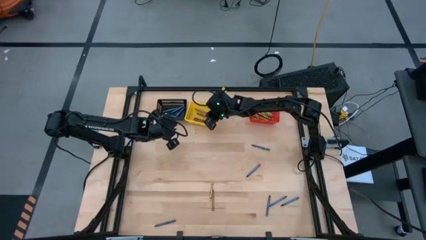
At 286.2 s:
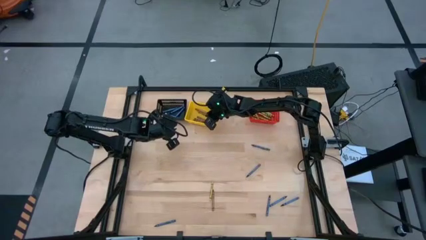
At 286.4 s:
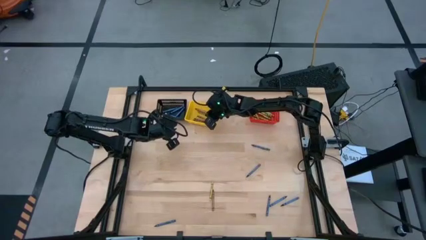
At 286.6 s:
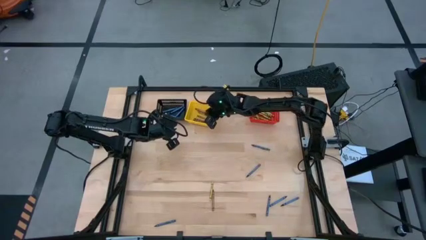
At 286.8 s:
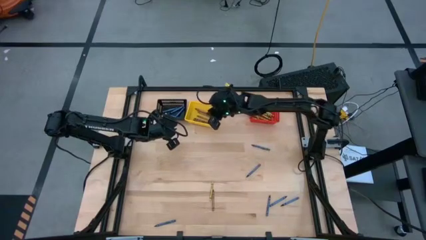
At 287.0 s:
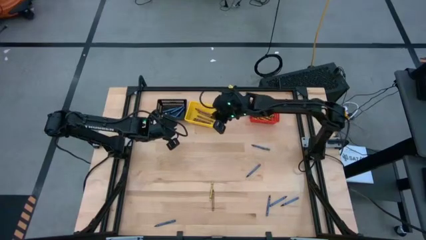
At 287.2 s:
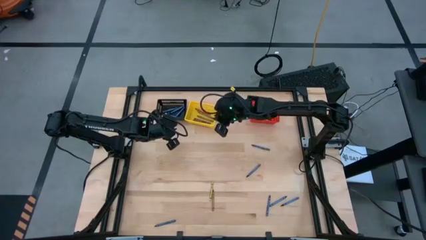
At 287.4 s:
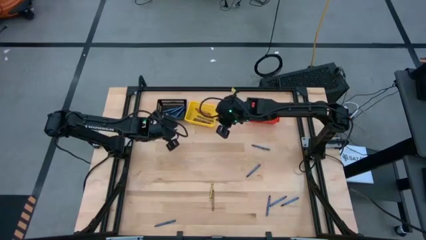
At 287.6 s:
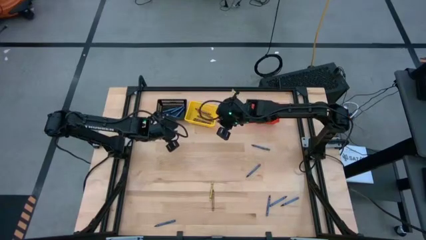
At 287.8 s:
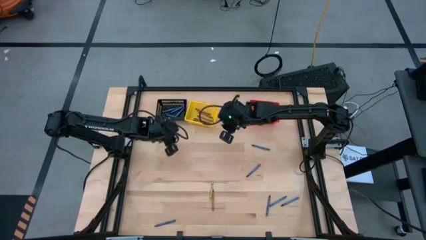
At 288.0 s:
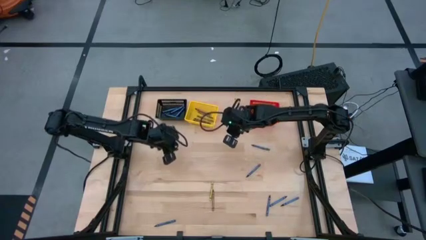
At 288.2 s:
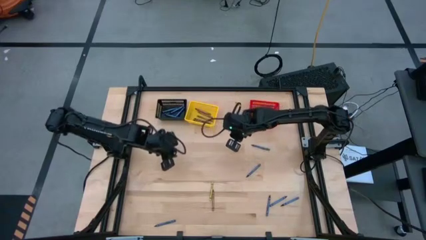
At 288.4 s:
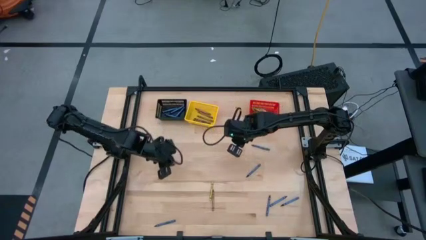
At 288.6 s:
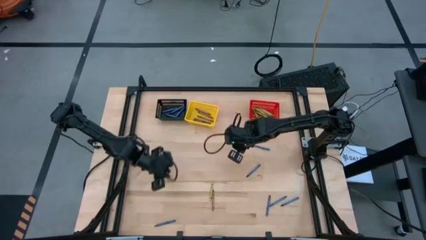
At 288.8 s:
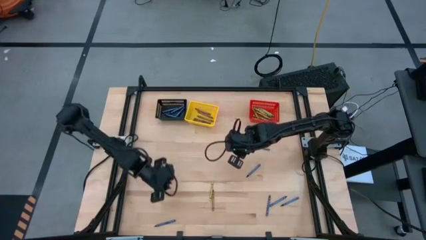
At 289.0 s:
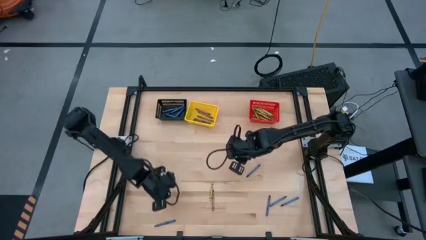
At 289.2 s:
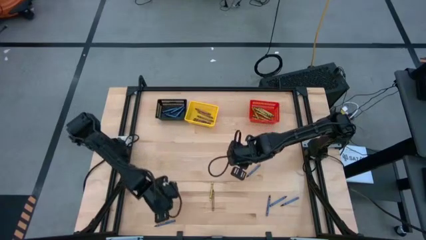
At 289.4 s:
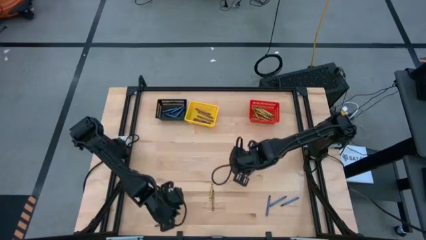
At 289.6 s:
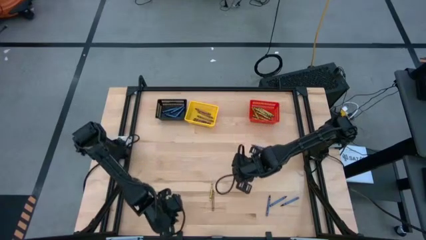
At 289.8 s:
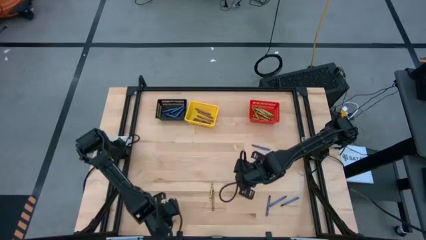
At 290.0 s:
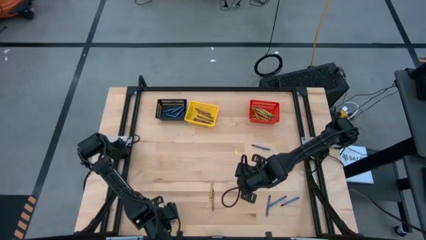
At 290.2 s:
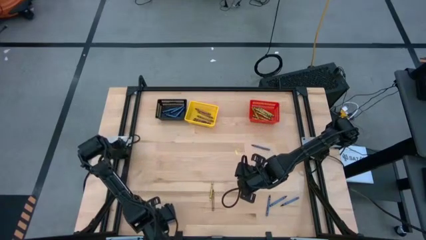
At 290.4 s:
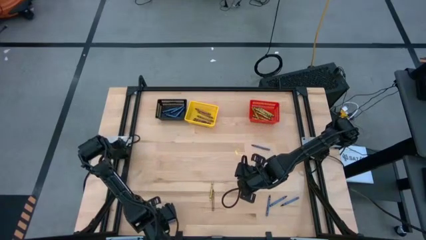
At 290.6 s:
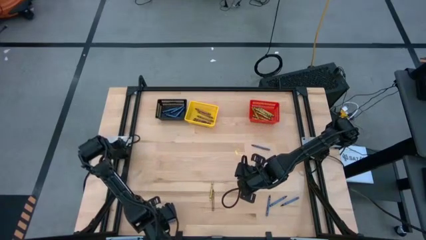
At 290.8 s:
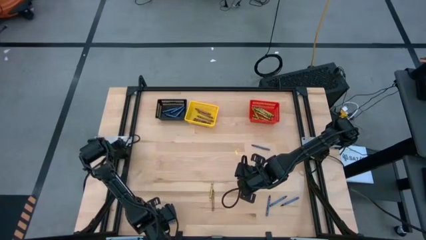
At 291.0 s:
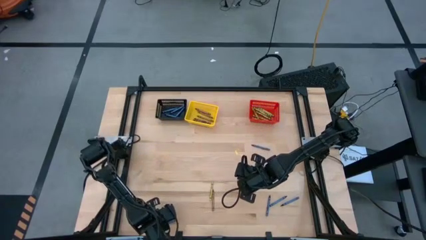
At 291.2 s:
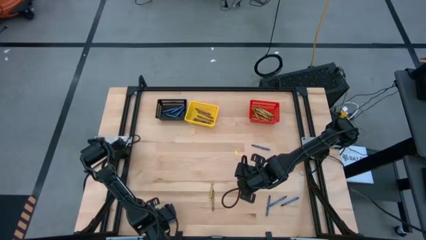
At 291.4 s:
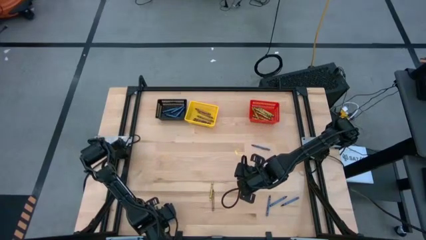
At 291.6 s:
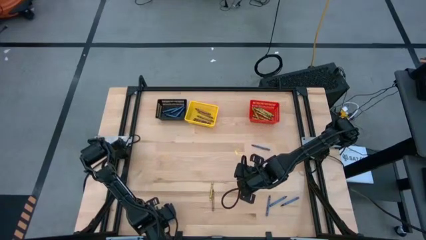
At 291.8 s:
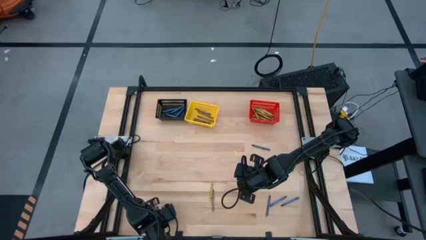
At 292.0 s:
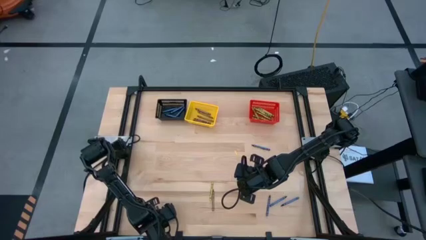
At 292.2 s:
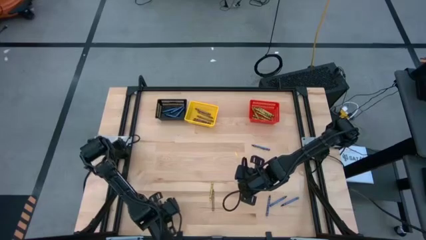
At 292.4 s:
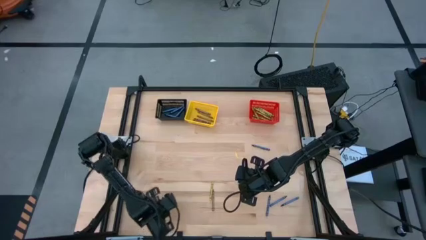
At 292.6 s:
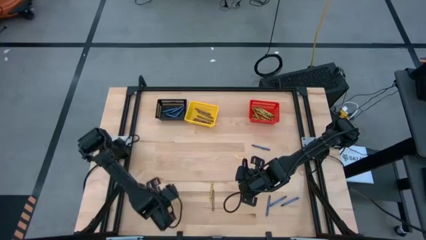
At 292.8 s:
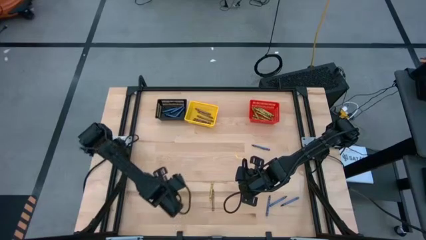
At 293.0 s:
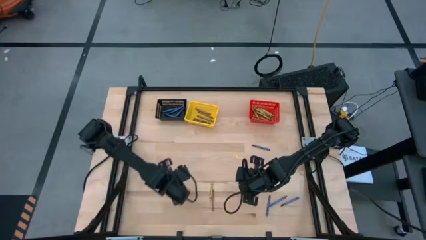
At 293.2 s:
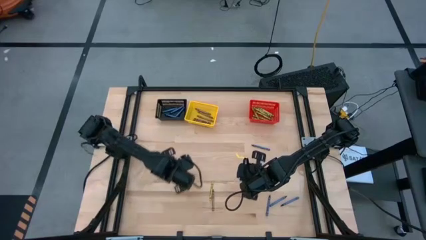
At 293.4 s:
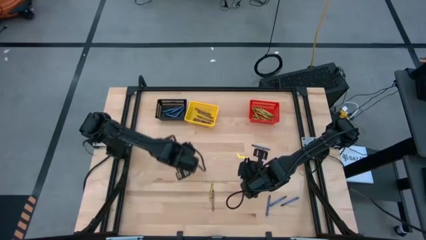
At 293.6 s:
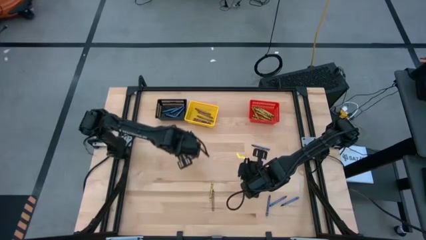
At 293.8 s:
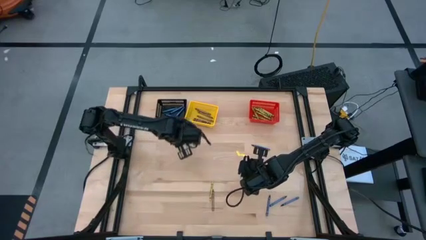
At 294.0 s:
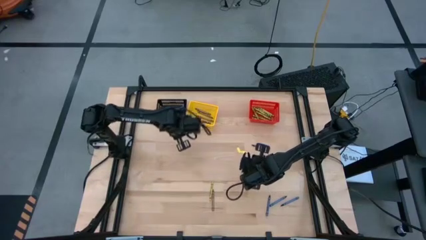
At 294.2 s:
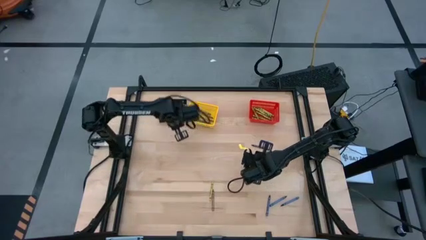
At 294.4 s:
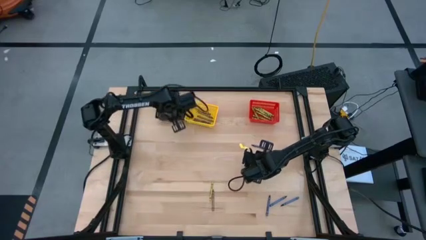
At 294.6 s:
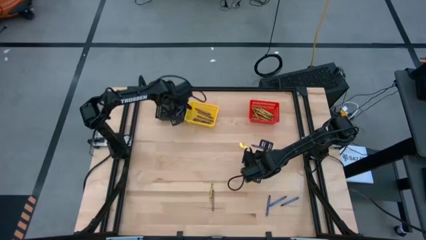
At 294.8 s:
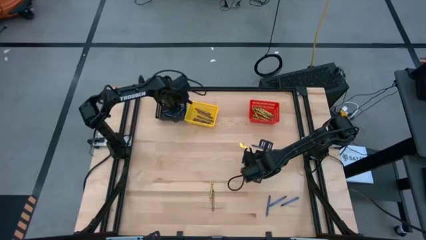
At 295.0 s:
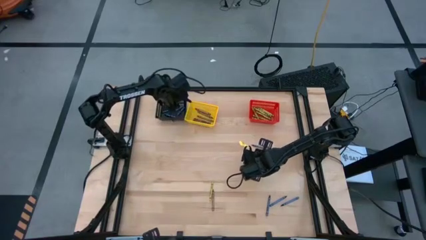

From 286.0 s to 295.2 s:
Task: Sort crayons
Put the blue crayon into the black bin

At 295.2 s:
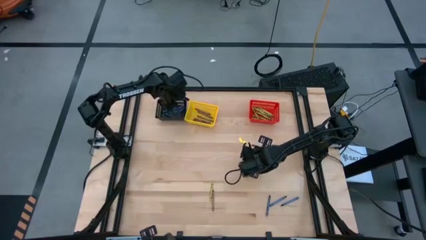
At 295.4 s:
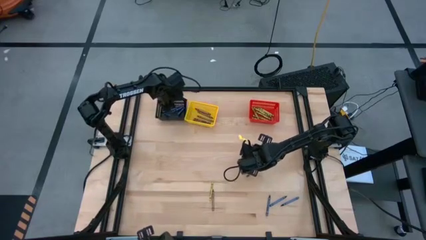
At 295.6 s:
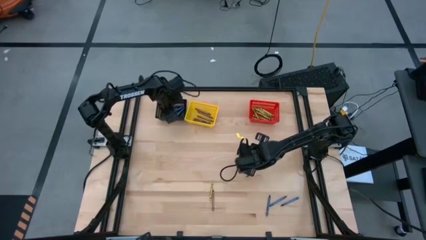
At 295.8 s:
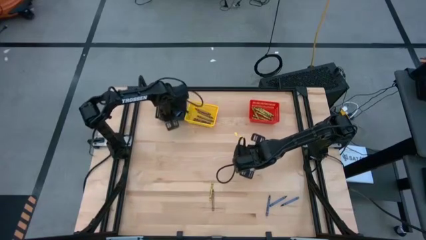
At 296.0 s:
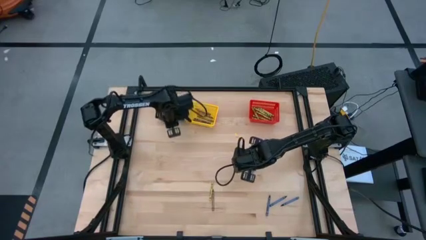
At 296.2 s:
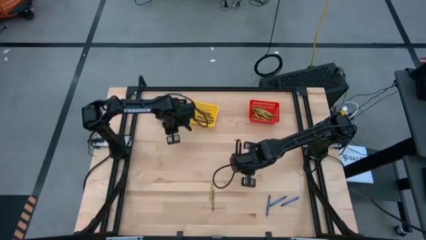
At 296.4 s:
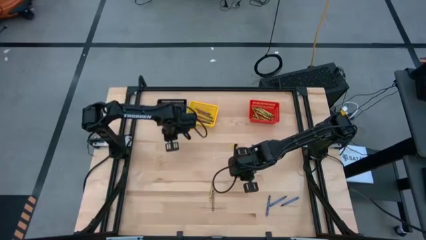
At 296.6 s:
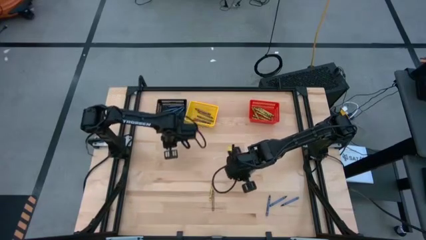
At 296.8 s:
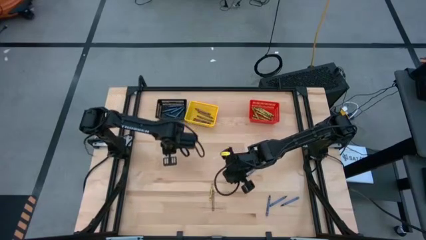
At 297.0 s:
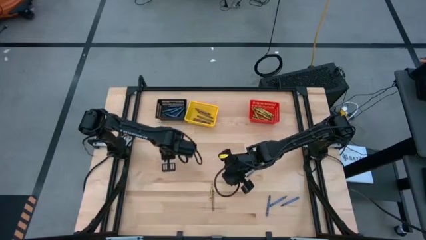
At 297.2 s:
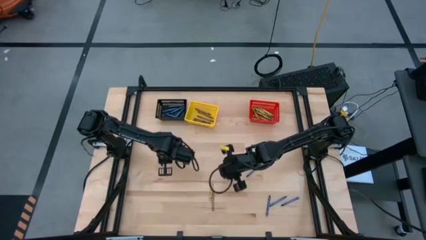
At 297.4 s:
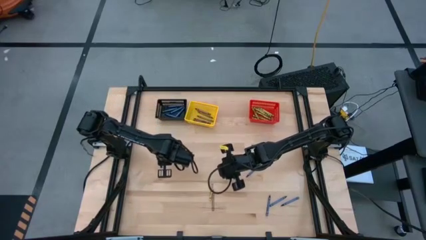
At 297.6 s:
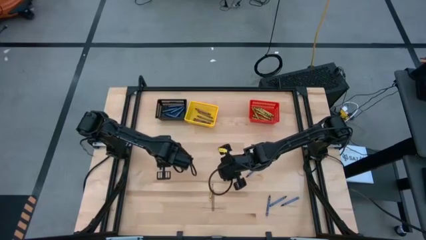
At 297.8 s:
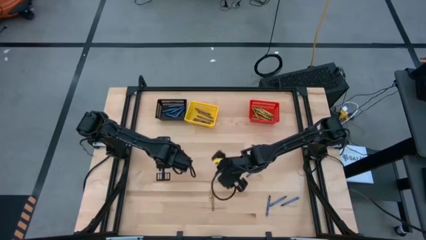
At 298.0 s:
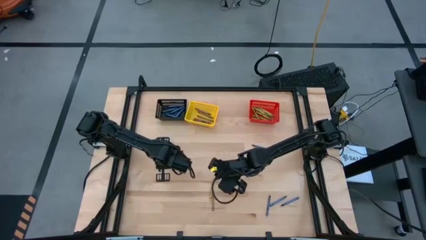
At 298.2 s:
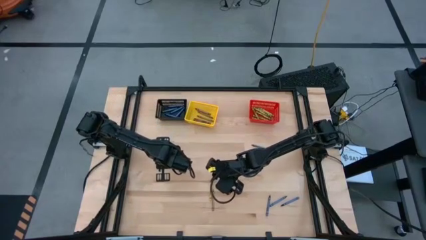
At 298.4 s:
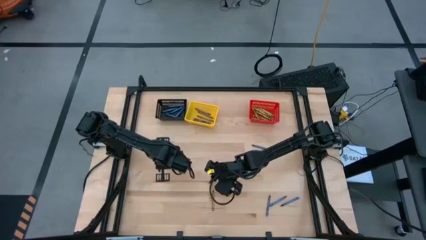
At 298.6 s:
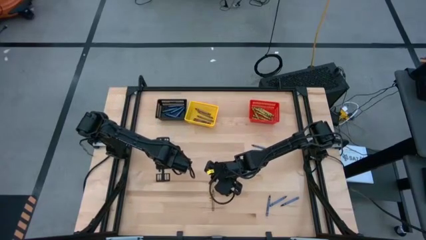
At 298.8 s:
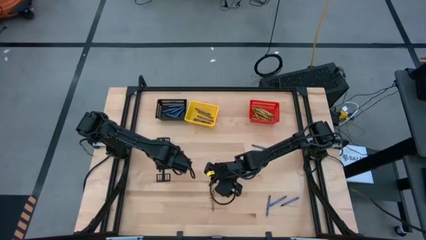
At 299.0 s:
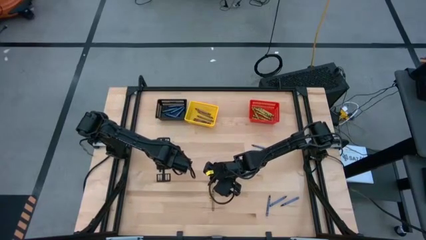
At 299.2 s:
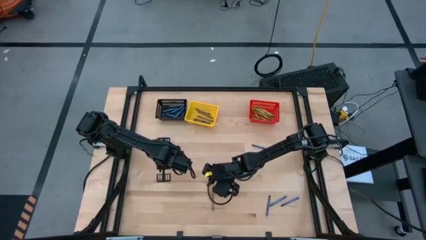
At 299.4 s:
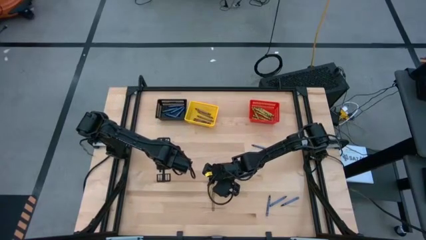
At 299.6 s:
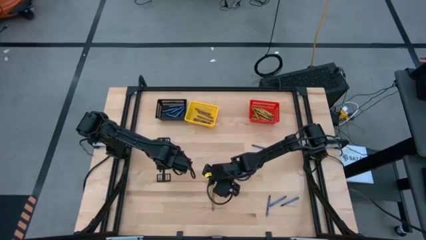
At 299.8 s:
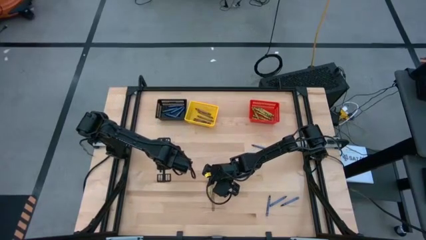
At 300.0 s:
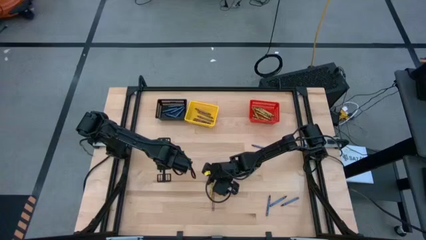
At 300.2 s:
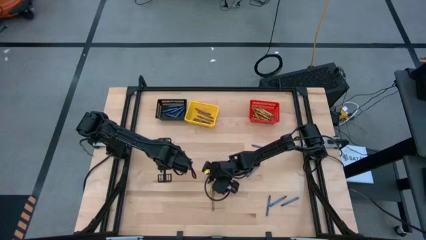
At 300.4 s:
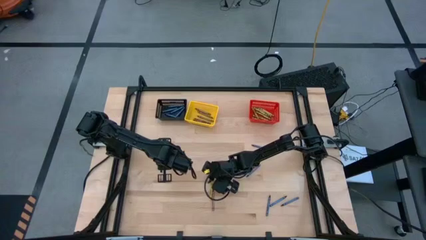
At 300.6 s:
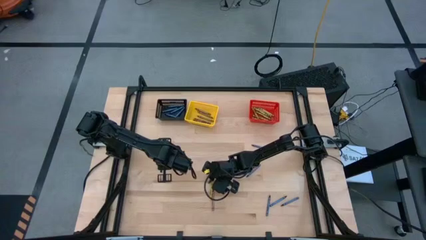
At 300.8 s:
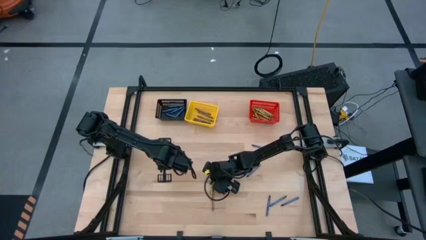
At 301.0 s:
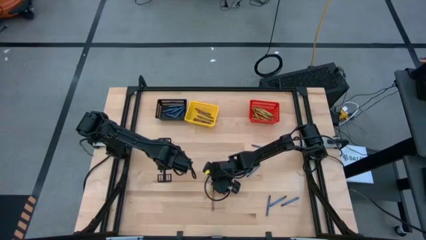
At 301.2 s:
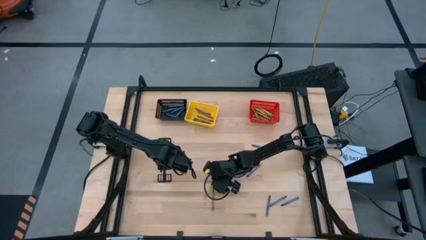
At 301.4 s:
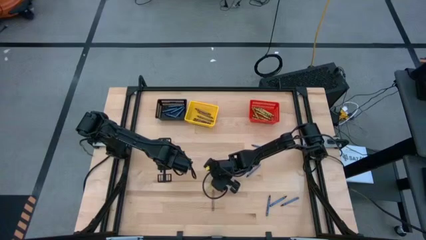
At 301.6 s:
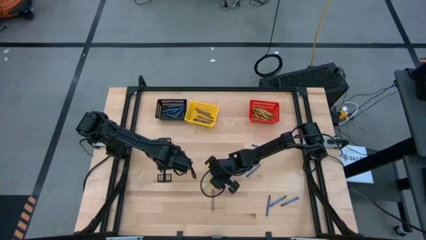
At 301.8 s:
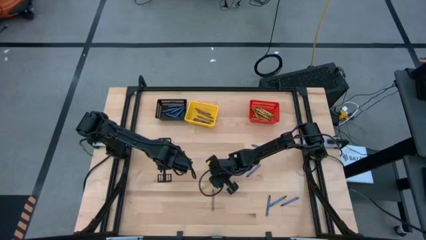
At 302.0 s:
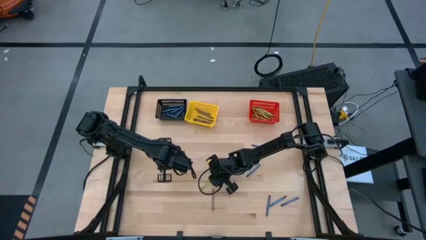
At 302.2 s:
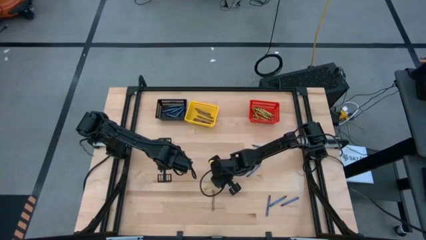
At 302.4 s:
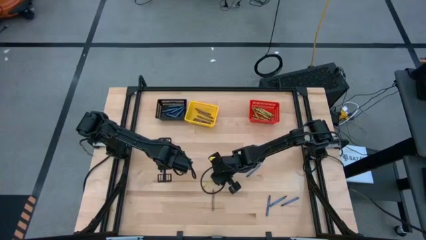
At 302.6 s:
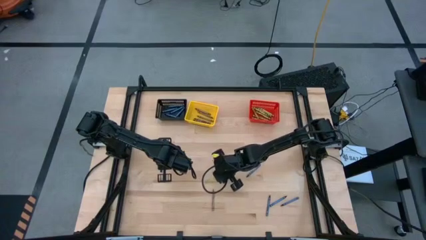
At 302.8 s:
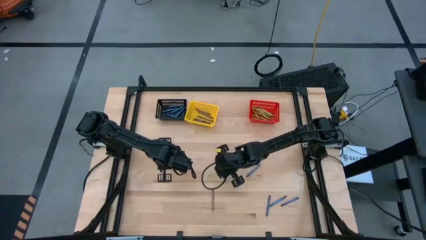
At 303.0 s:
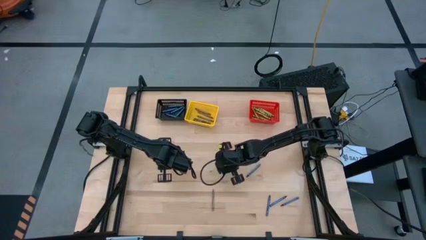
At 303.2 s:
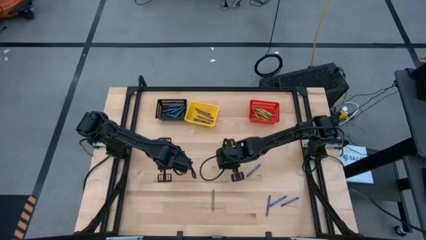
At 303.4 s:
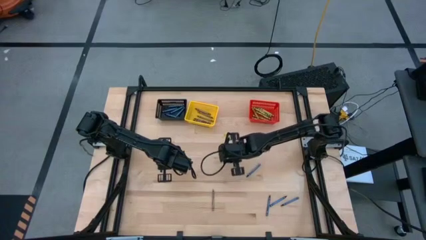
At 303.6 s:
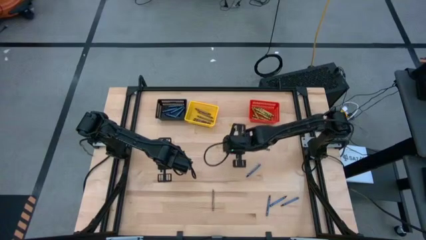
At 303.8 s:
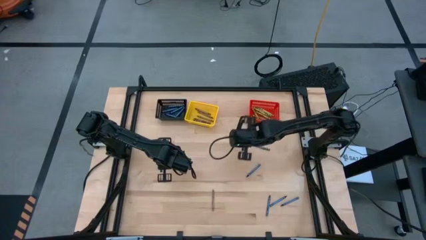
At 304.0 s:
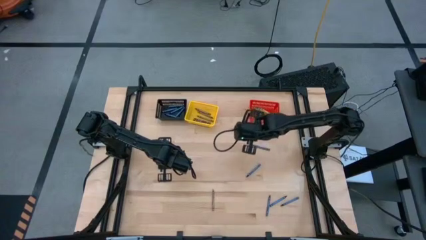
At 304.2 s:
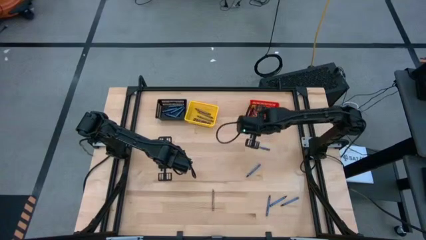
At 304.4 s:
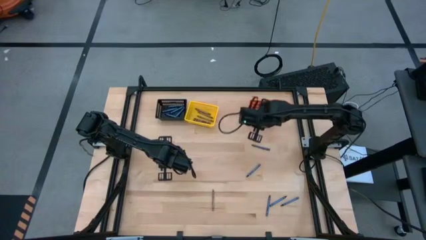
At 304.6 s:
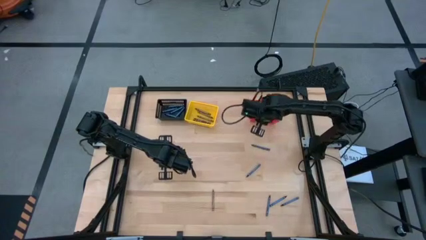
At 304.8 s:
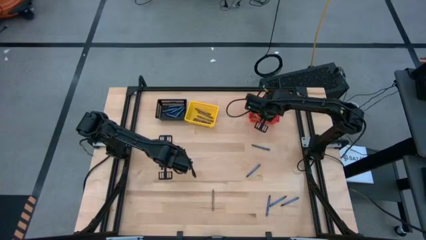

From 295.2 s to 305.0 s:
Put the green crayon into the red bin
